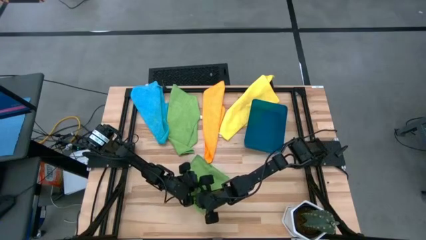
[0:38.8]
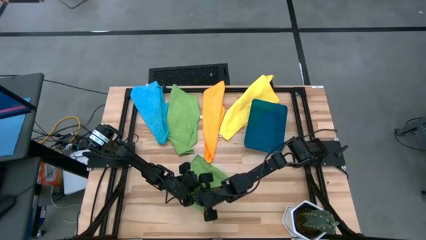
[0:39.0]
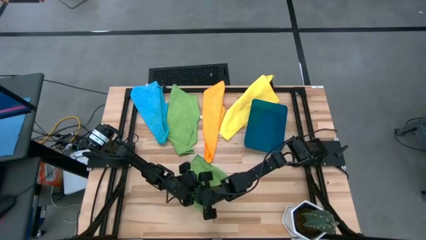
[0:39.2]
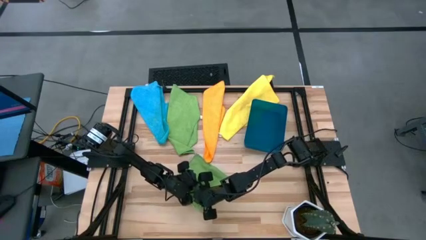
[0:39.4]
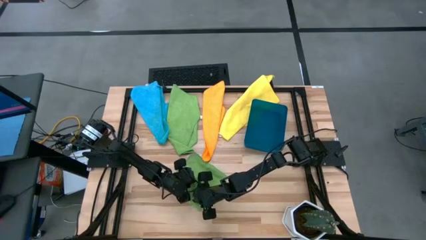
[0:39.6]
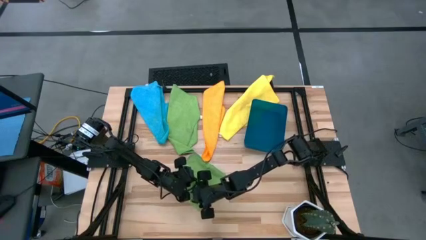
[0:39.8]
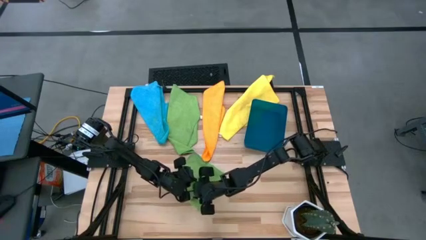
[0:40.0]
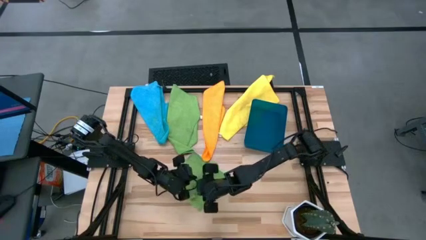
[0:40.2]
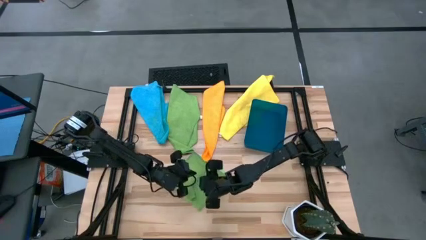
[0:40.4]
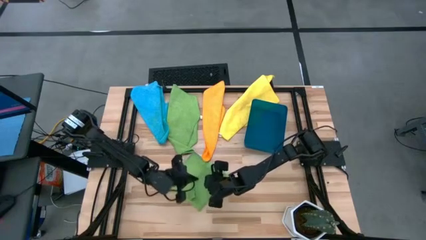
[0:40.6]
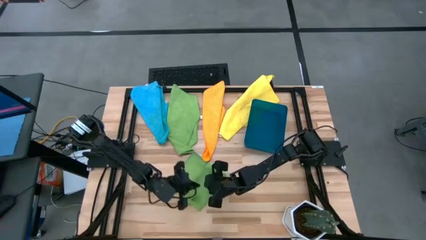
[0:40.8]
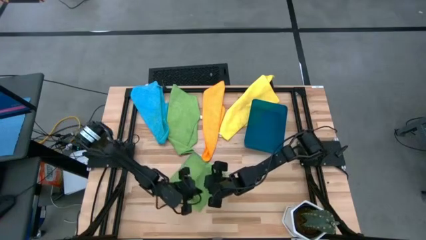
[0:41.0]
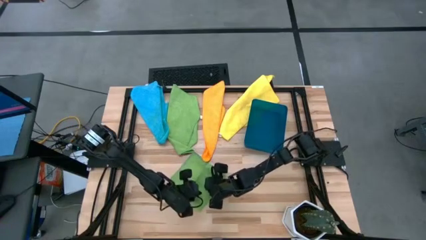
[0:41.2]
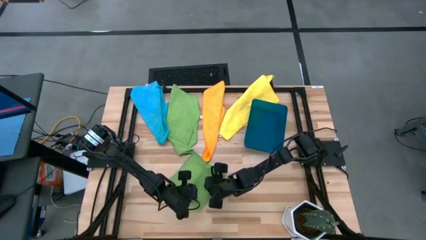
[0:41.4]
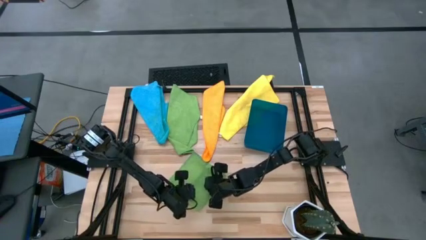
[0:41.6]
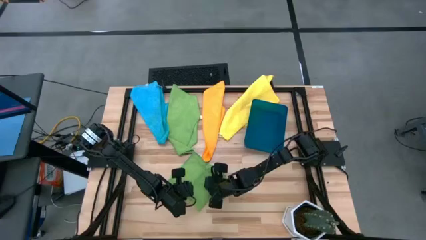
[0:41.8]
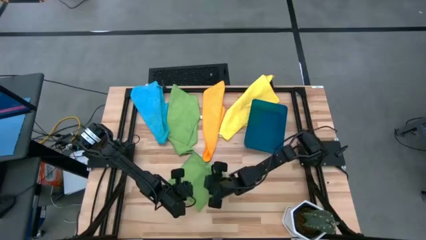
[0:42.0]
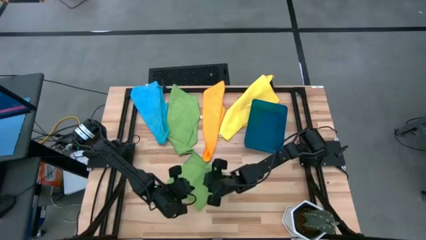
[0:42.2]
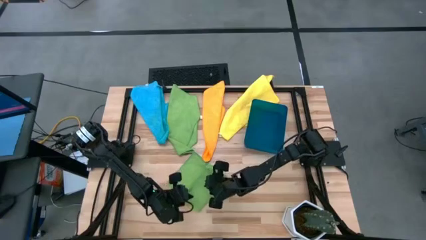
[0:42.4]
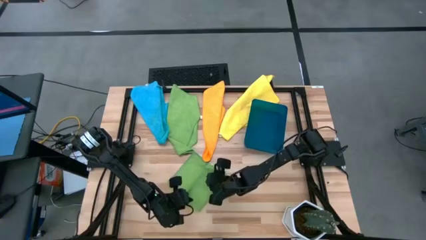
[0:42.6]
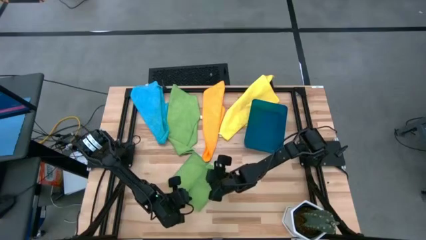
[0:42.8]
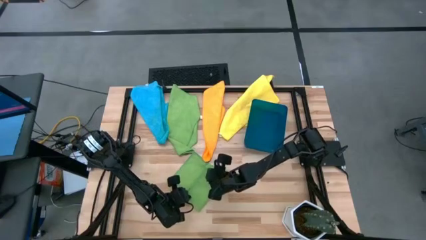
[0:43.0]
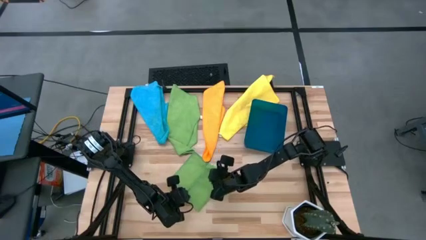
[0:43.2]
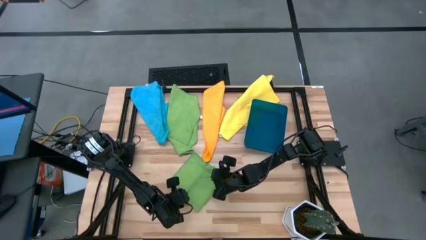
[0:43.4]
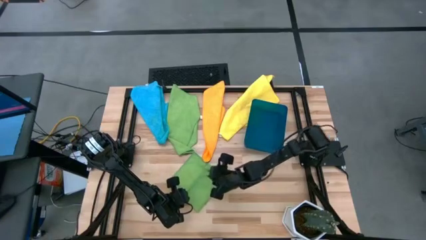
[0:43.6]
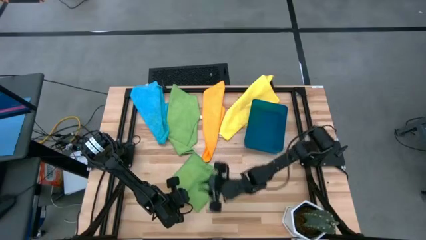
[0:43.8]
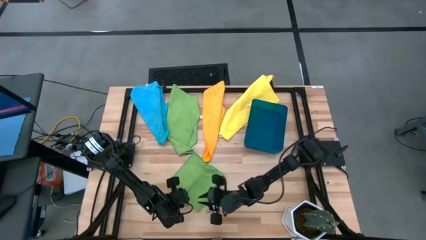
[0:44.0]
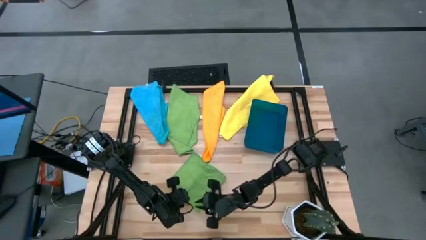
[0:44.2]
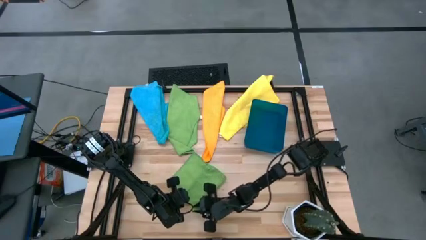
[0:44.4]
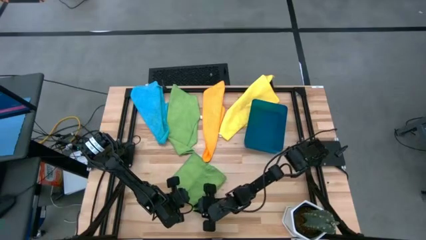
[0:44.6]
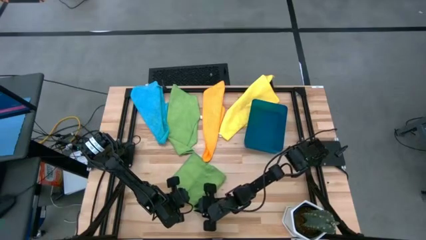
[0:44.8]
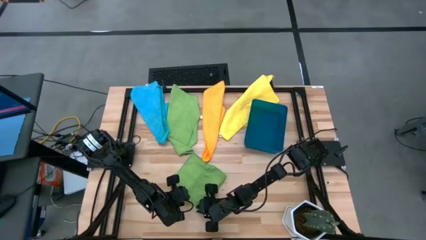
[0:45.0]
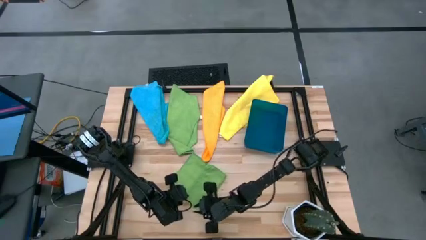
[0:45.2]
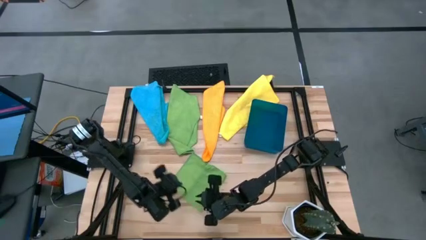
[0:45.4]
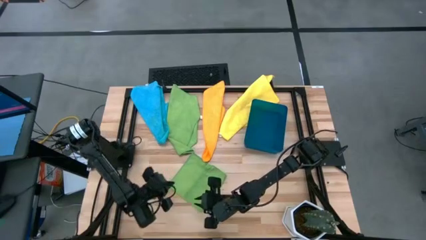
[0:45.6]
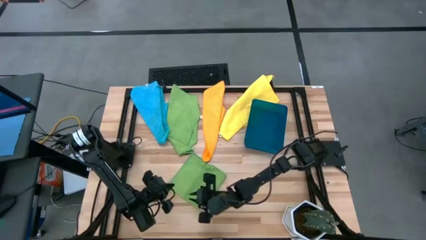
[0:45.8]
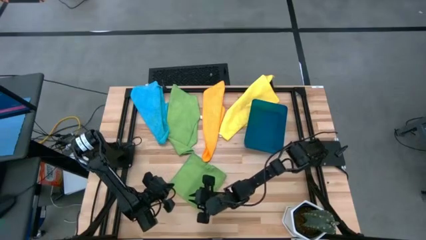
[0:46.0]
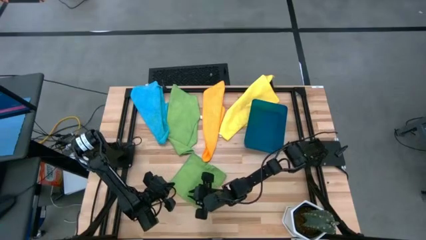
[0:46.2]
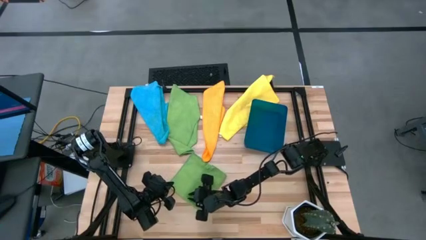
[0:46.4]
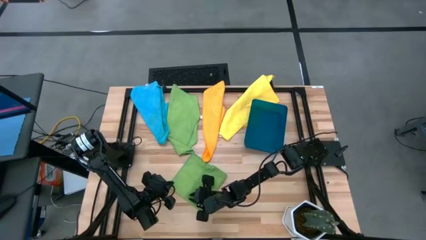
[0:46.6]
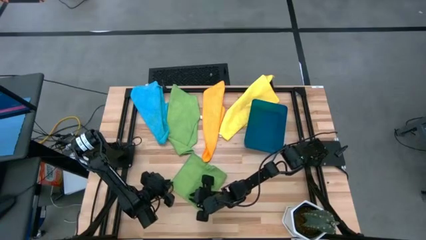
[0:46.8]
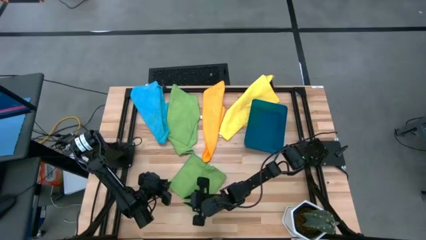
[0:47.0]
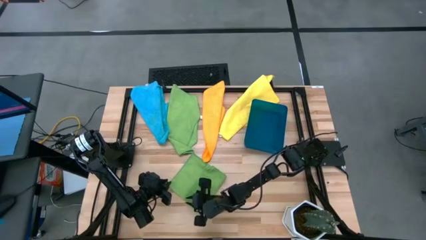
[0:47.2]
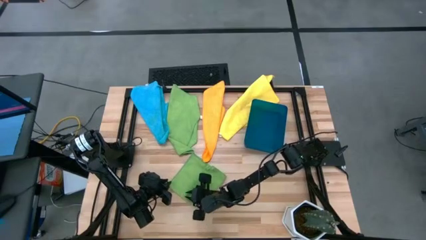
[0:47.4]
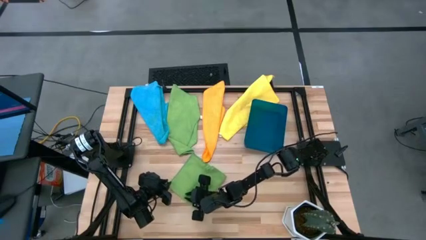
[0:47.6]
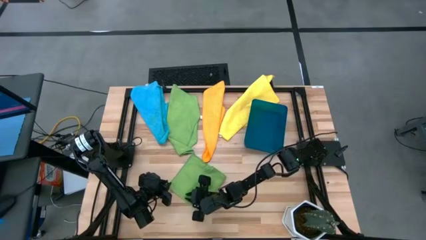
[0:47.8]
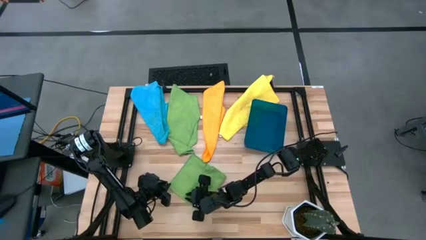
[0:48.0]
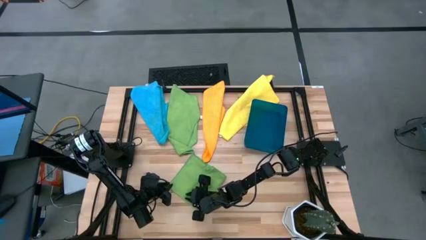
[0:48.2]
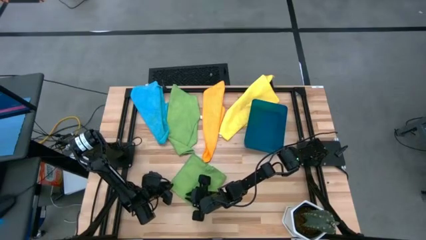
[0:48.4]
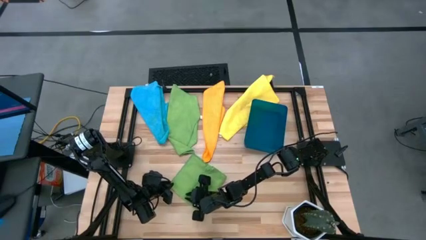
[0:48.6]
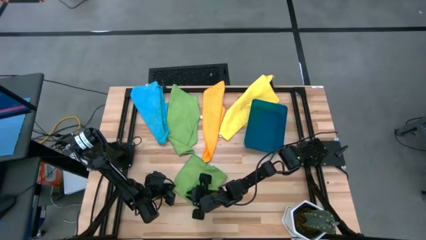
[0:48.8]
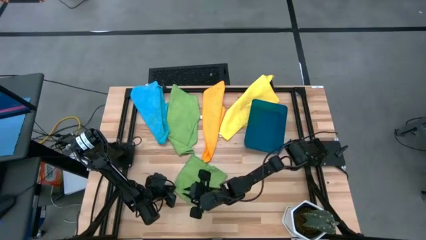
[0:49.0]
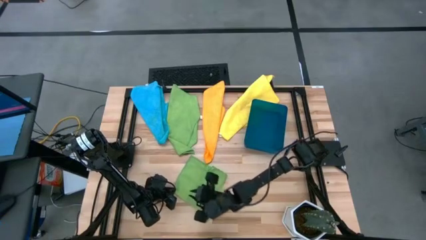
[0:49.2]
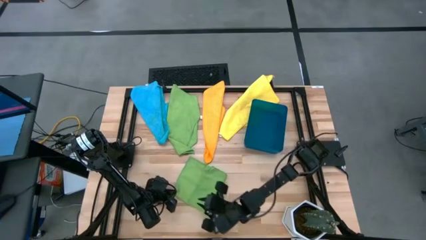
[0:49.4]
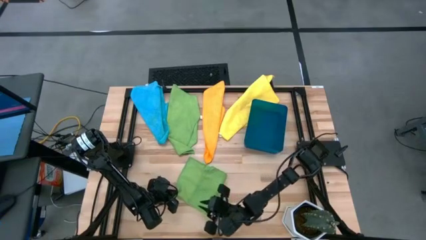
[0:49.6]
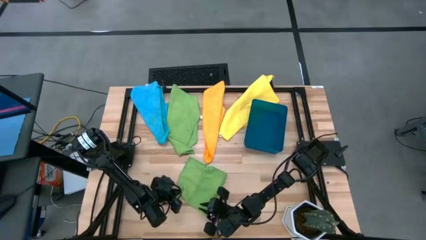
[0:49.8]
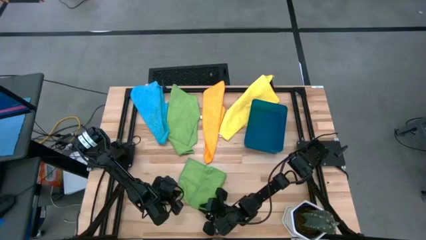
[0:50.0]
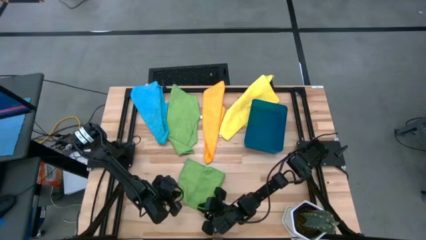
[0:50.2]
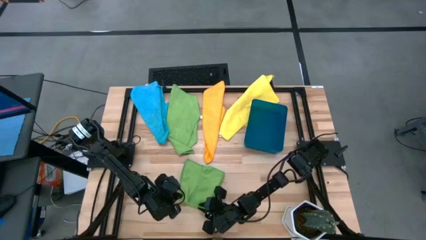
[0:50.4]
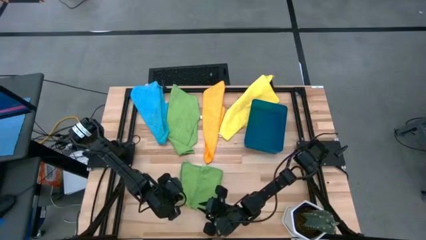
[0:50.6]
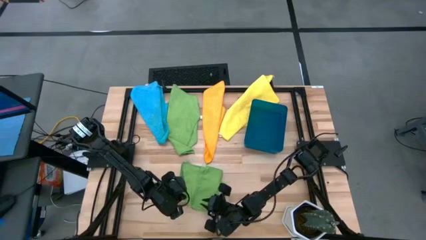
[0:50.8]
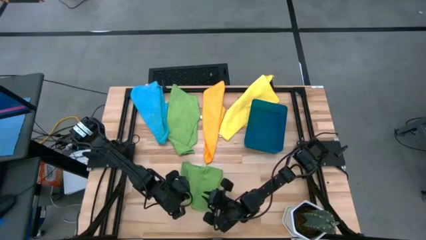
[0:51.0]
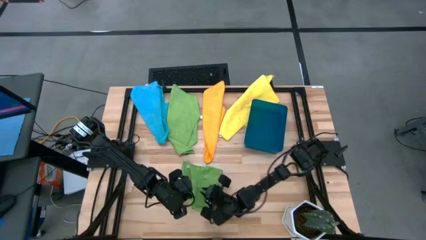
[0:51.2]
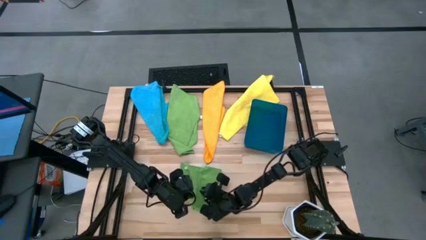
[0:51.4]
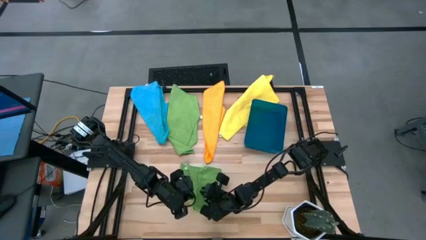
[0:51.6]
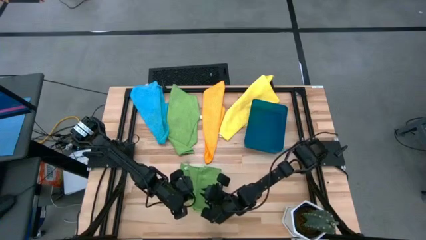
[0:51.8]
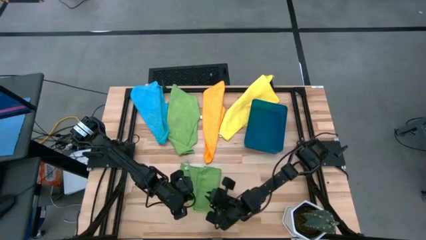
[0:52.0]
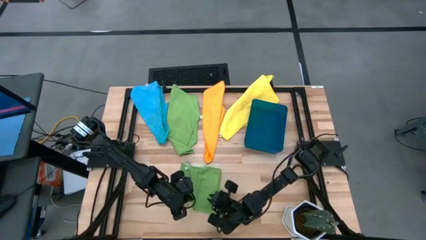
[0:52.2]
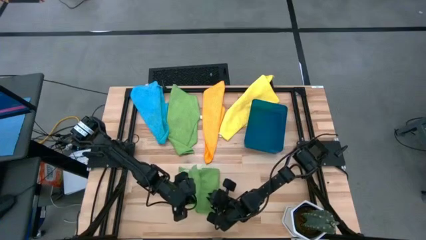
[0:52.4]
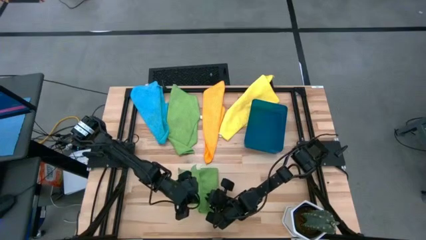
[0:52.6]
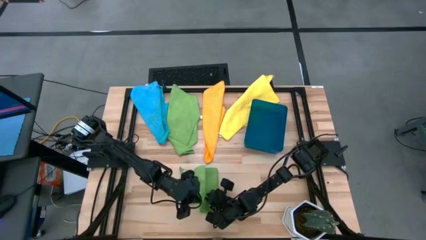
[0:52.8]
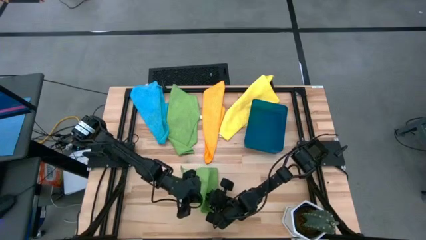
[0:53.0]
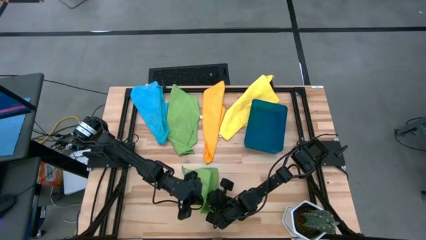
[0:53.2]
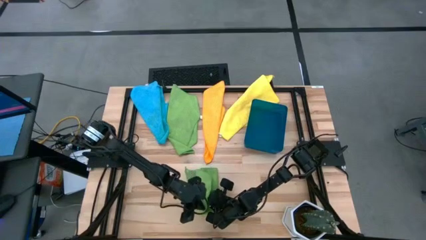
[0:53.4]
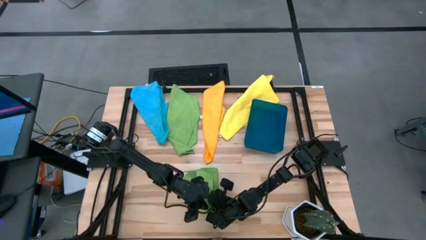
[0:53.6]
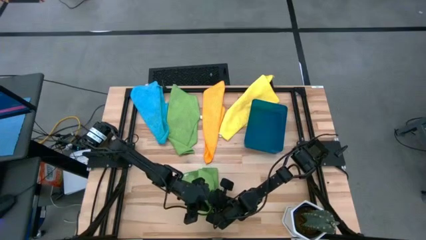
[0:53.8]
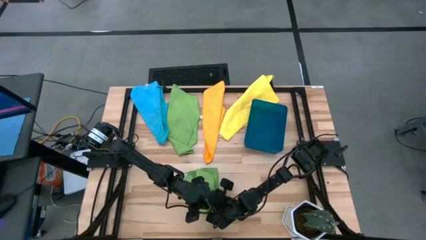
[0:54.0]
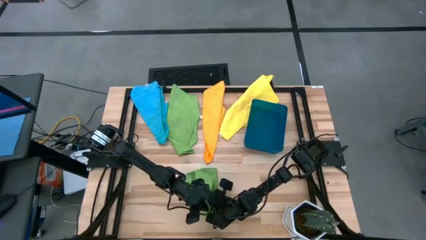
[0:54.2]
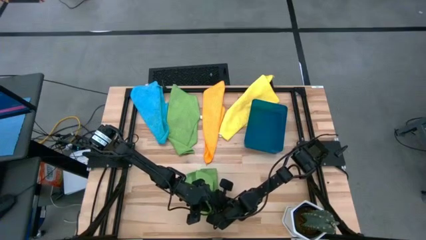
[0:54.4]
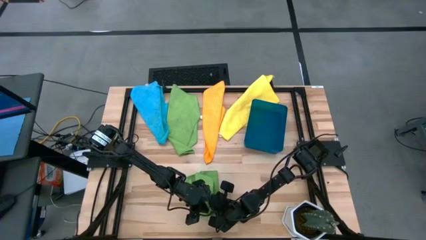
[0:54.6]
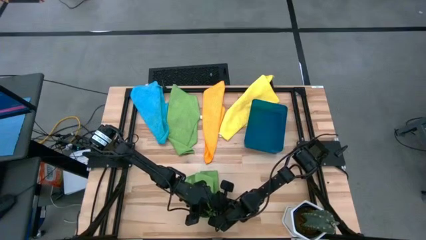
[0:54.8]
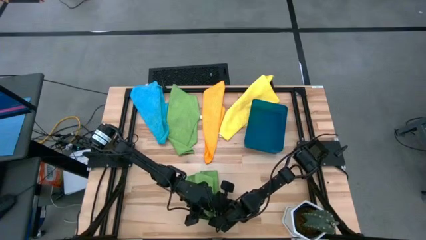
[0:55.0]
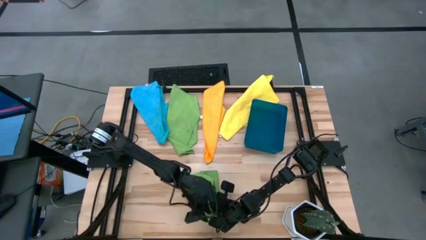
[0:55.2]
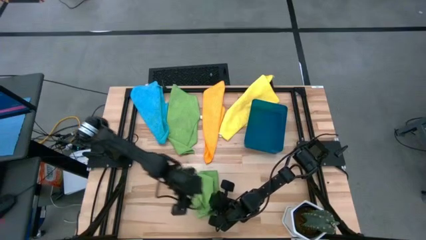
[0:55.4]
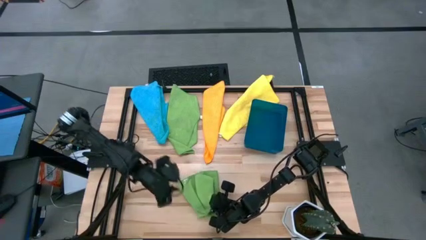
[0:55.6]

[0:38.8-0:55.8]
Task: Fold microfiber towels
Fold the bottom green microfiber cloth
